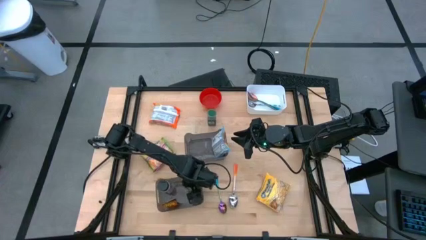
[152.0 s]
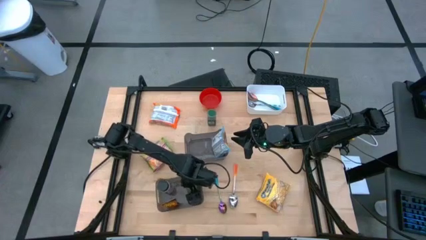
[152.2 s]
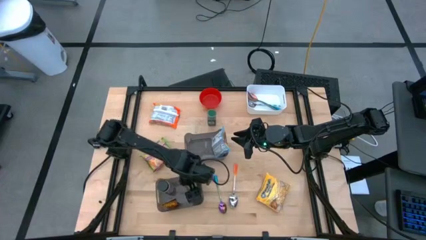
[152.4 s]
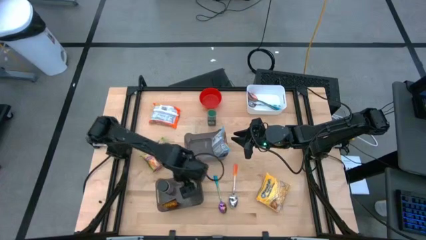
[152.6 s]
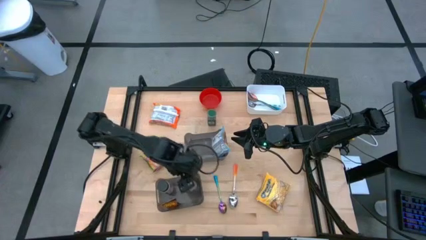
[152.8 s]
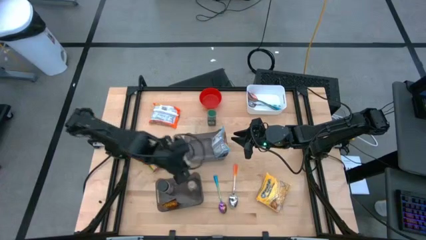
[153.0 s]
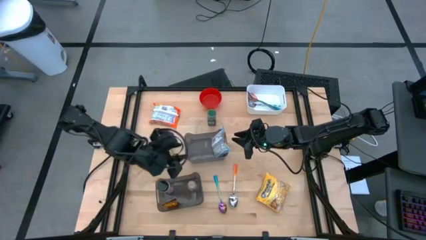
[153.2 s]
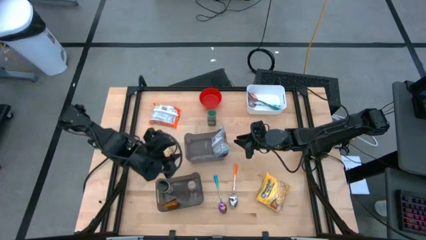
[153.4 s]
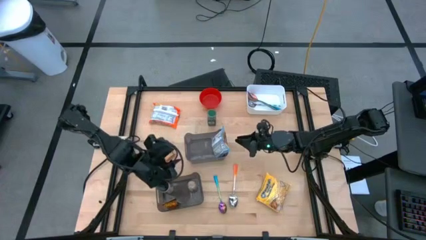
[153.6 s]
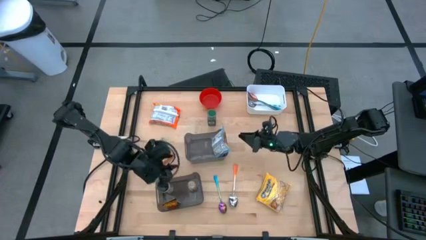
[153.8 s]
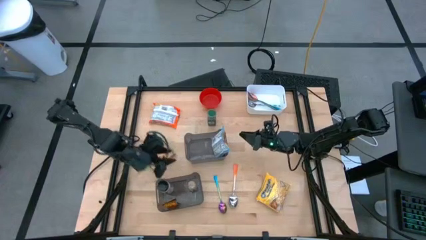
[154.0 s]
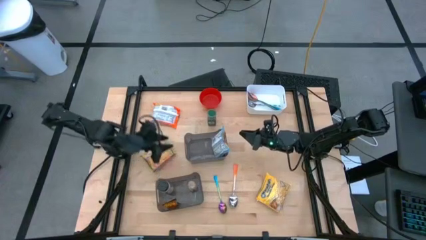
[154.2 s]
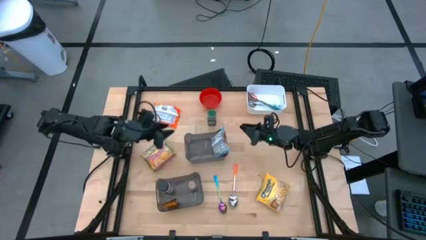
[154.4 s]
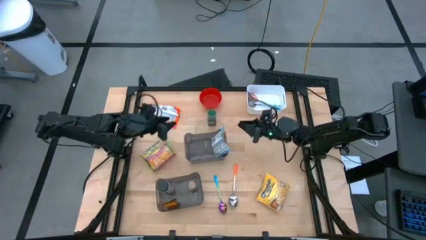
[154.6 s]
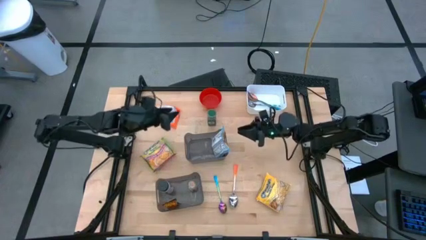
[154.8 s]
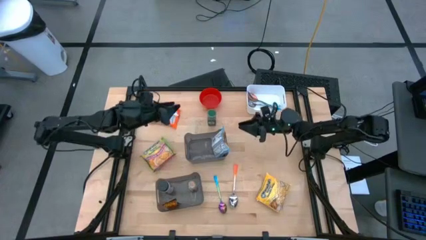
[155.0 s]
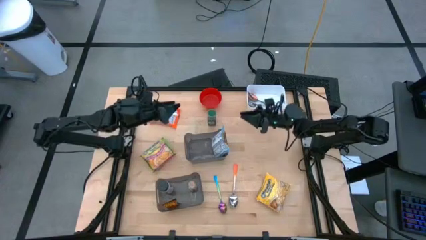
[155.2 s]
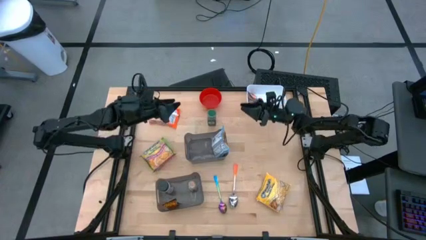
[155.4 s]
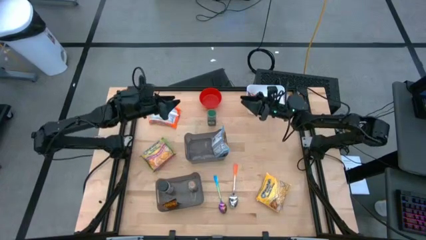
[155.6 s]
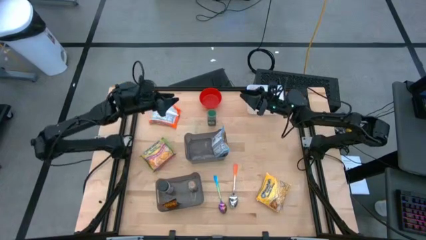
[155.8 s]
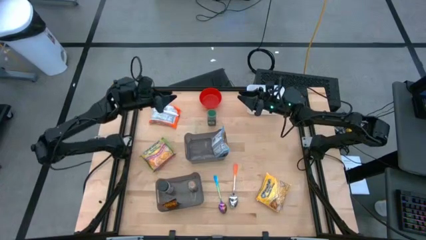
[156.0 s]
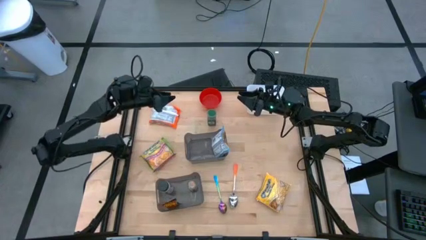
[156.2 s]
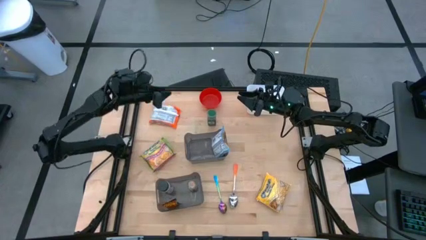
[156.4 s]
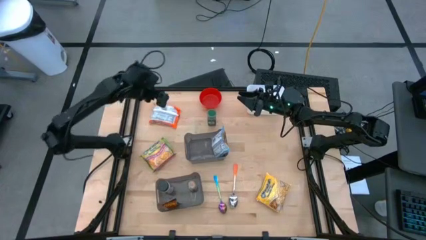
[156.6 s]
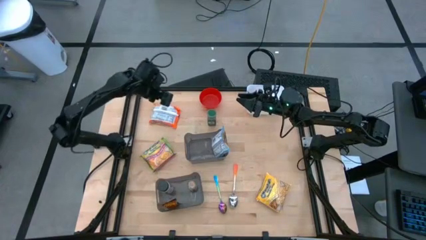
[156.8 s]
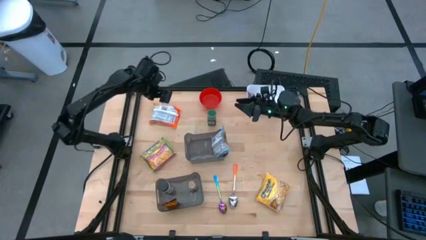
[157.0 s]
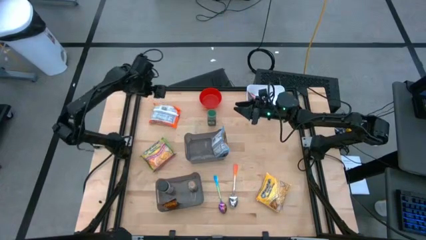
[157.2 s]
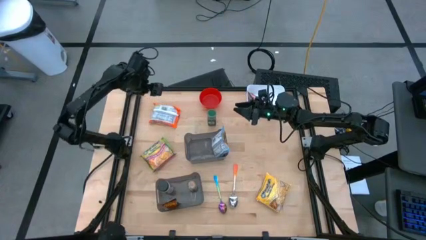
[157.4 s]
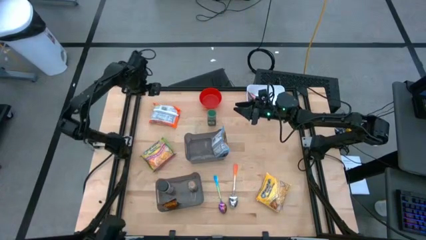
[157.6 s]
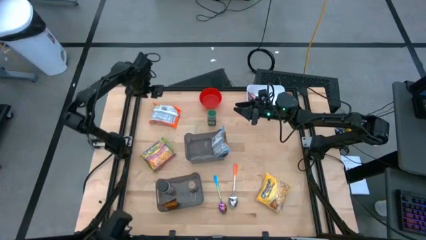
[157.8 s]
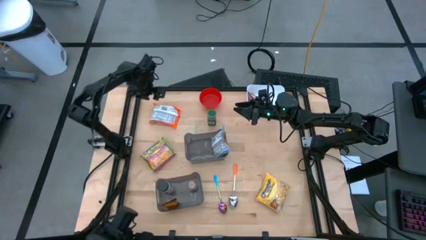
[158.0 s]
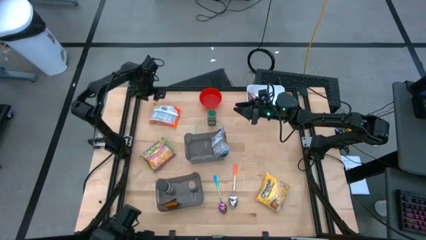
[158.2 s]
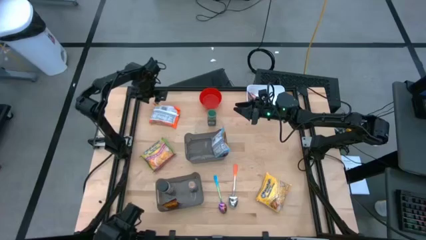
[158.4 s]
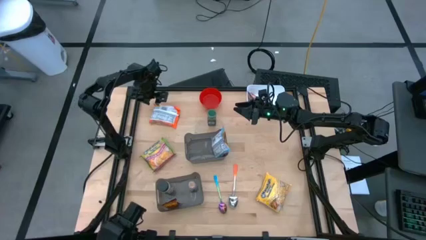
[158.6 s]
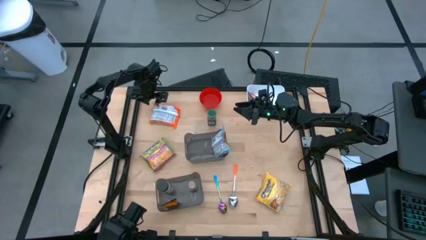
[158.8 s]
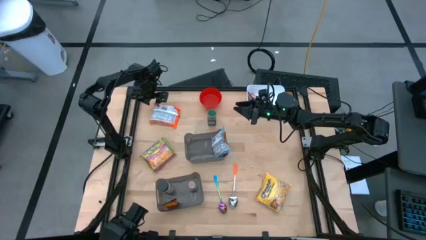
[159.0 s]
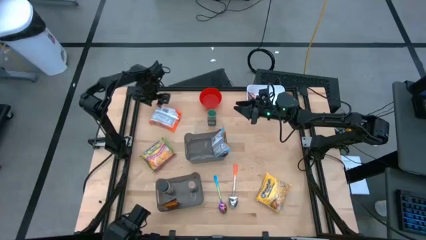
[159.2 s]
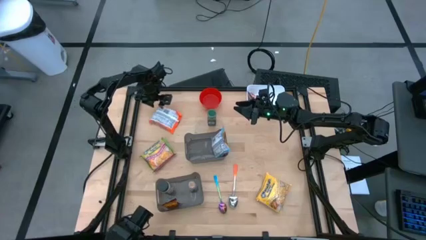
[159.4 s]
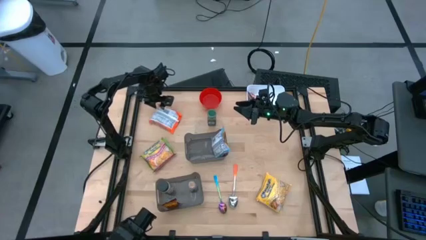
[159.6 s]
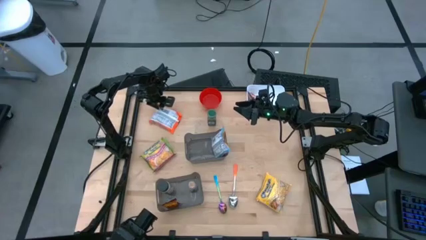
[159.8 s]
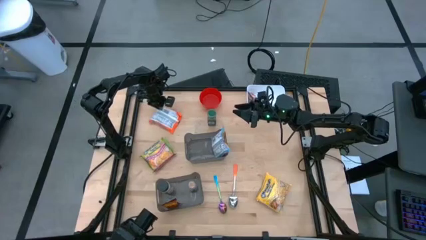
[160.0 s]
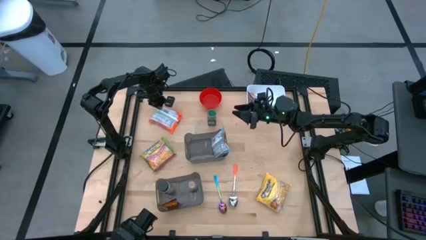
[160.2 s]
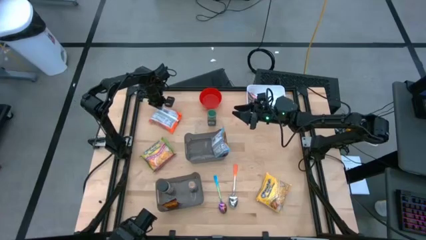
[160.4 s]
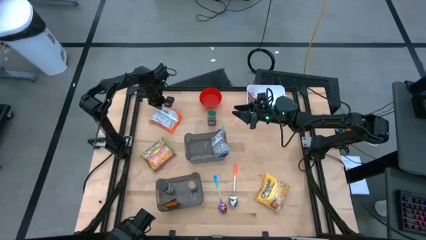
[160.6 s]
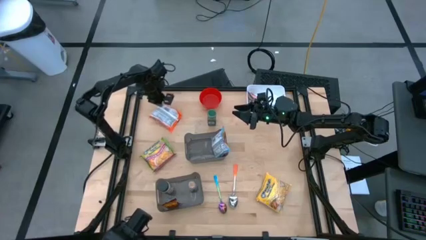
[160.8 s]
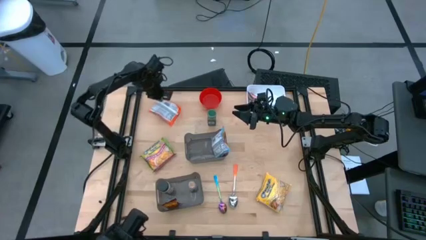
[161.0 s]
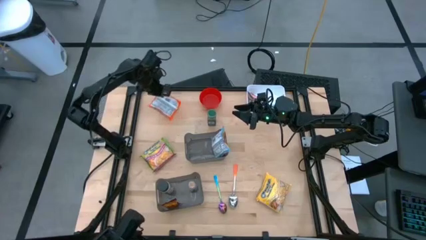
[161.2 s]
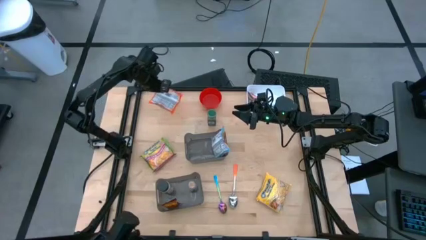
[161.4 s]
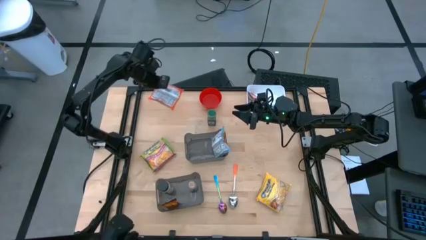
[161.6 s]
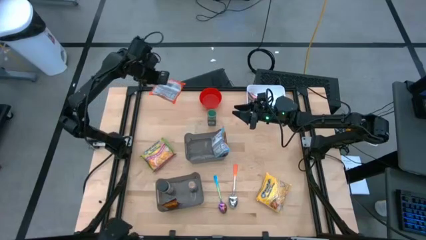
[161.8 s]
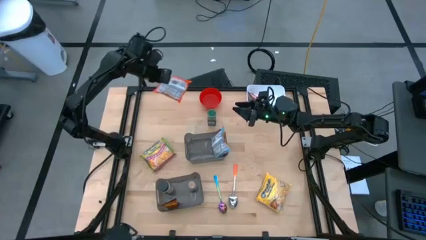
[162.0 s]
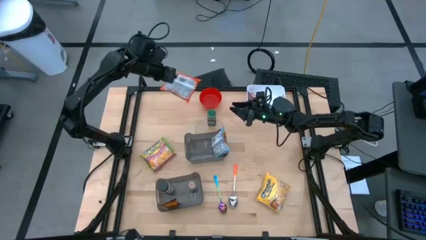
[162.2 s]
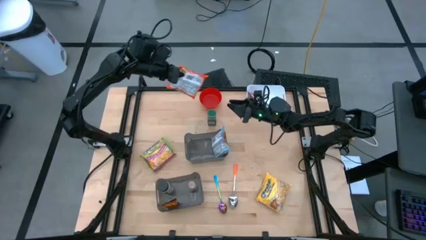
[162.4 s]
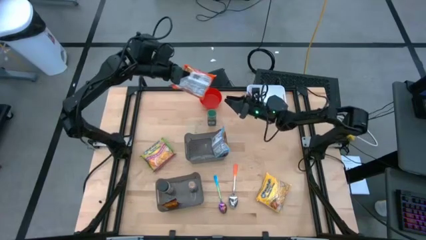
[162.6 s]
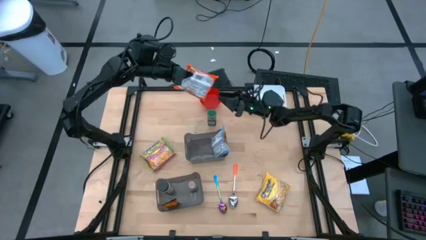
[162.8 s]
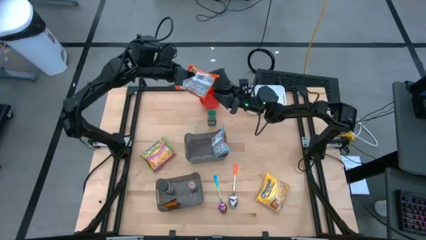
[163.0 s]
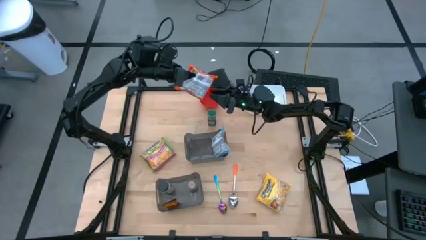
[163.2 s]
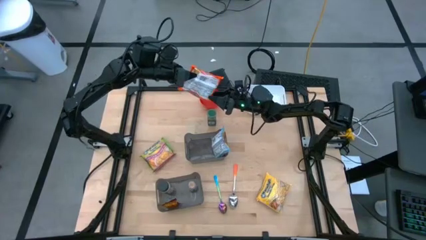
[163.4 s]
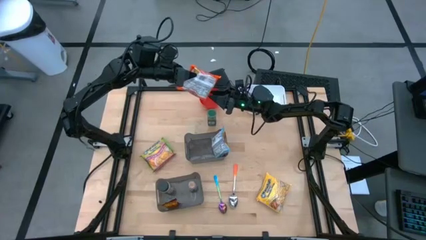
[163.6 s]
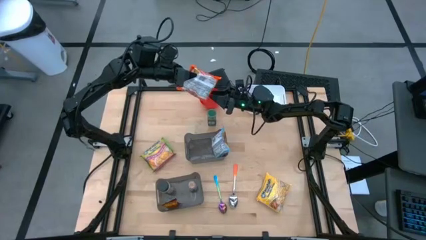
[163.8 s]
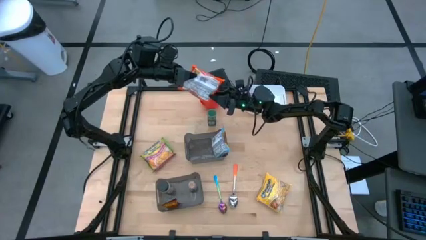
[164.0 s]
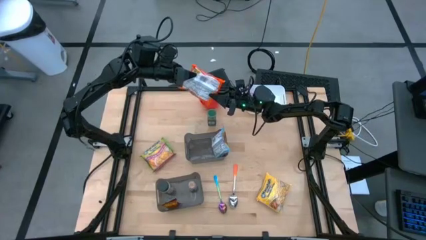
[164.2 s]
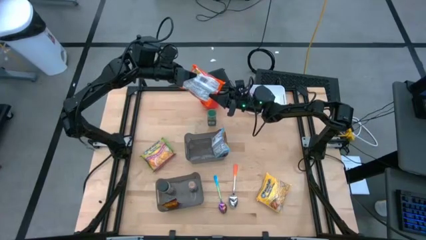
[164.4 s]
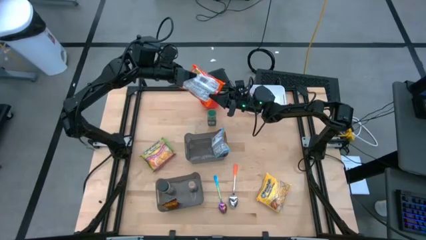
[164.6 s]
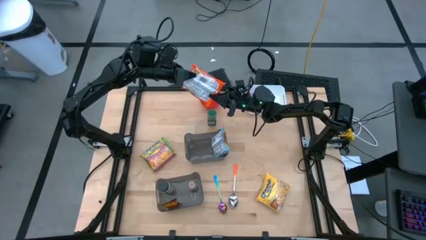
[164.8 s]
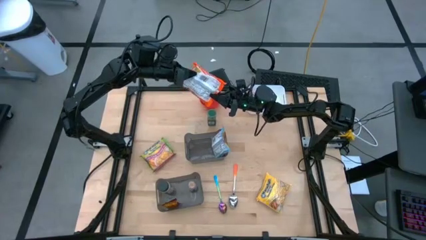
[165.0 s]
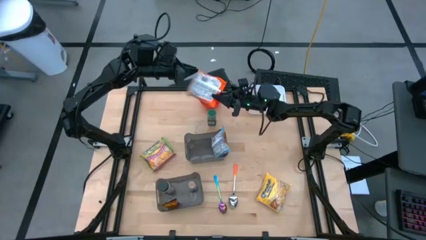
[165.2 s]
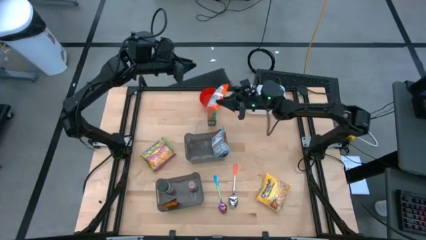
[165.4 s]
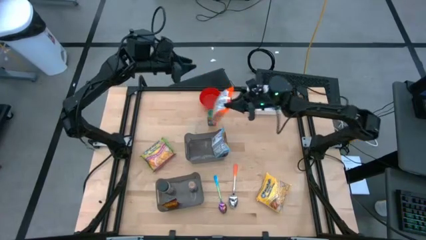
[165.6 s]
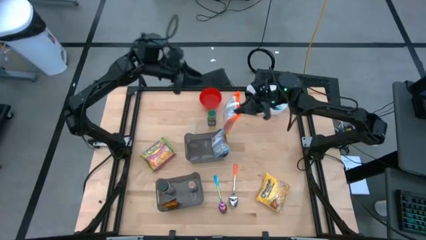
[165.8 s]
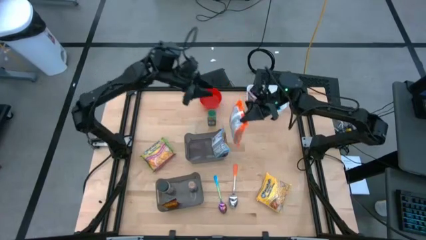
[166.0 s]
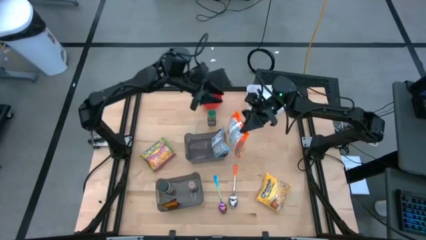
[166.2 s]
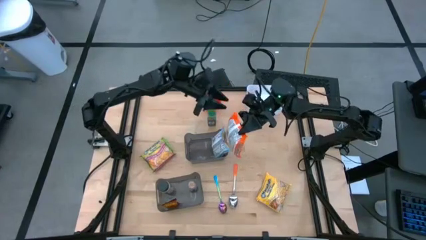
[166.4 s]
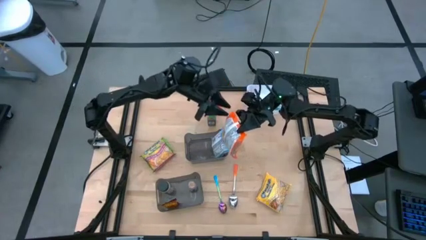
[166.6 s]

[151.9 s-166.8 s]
Task: Pick & Place Food Item
Put the orange noodle pack into the top black bin
